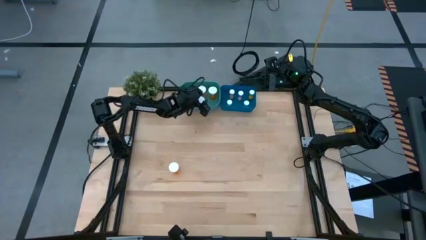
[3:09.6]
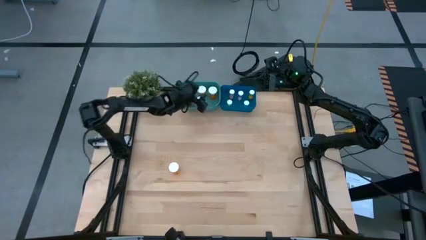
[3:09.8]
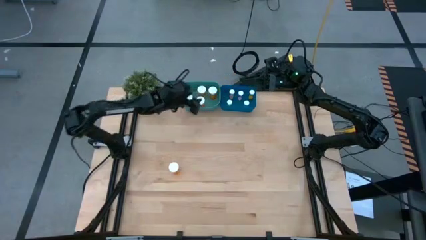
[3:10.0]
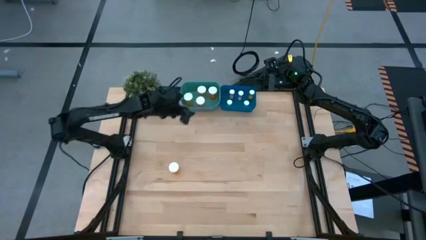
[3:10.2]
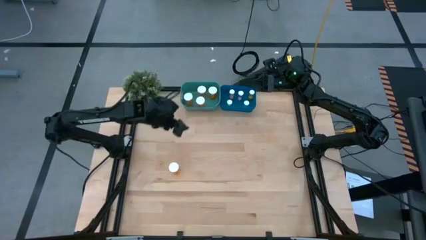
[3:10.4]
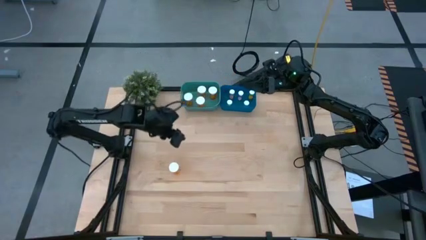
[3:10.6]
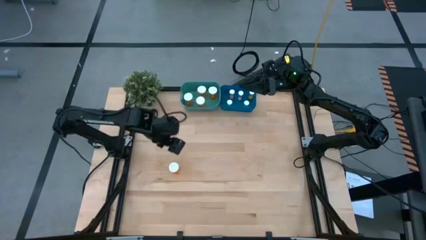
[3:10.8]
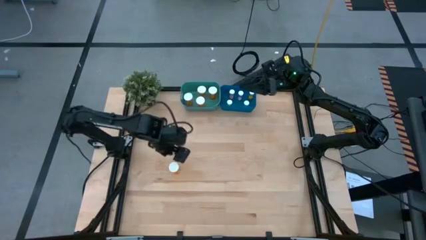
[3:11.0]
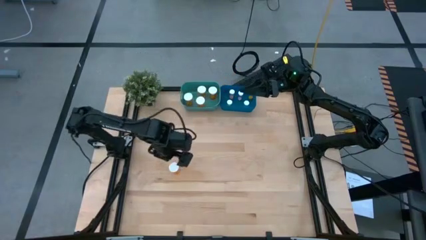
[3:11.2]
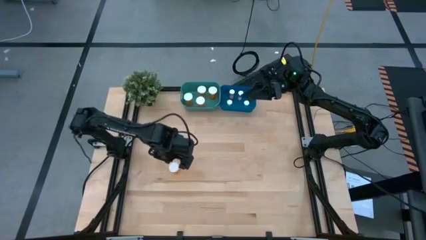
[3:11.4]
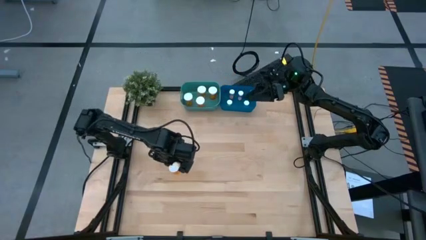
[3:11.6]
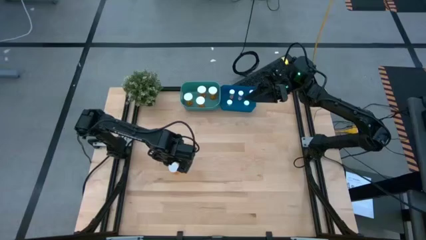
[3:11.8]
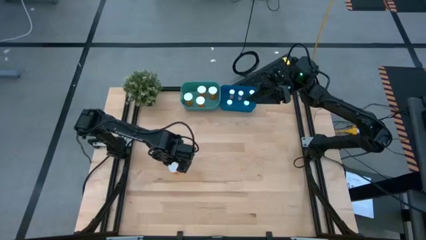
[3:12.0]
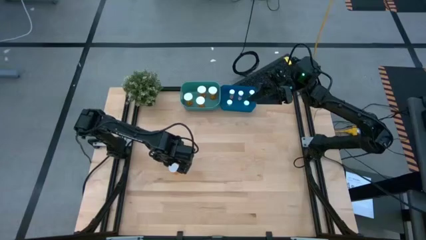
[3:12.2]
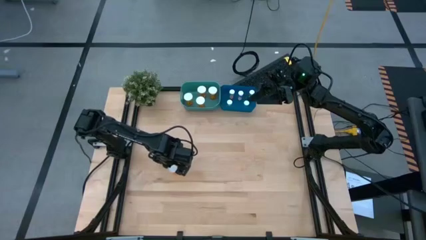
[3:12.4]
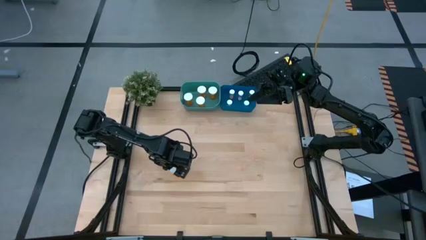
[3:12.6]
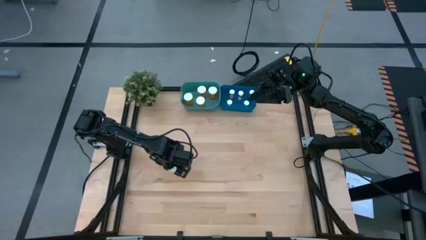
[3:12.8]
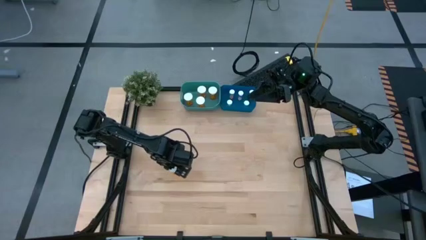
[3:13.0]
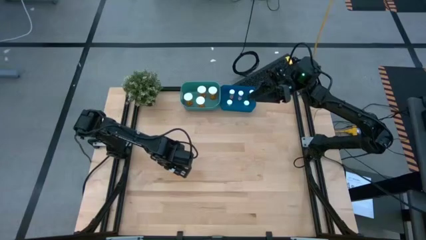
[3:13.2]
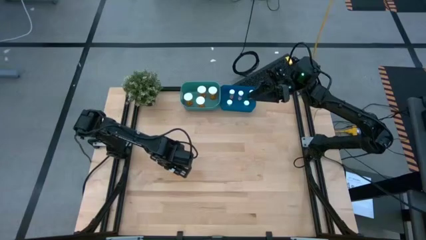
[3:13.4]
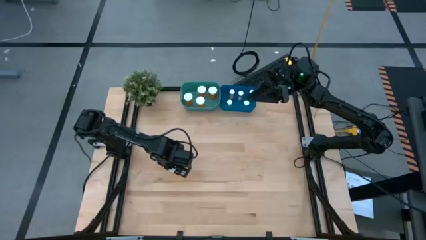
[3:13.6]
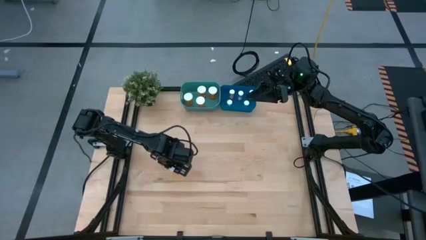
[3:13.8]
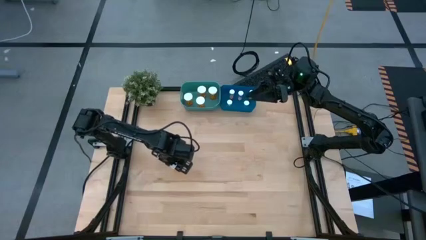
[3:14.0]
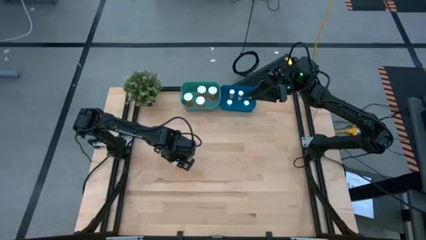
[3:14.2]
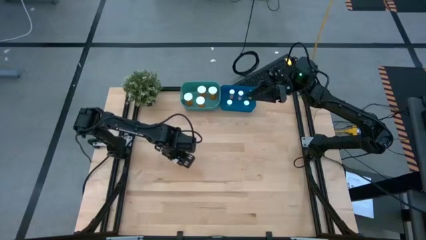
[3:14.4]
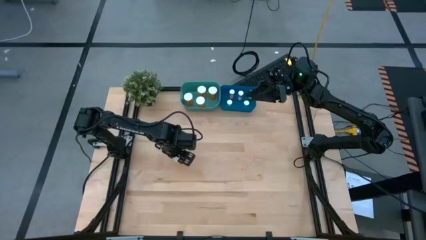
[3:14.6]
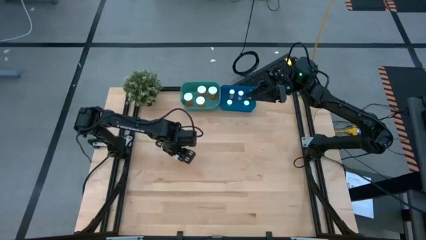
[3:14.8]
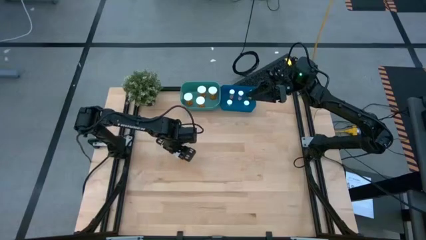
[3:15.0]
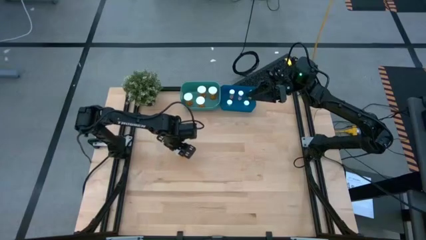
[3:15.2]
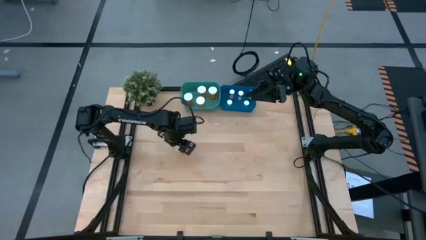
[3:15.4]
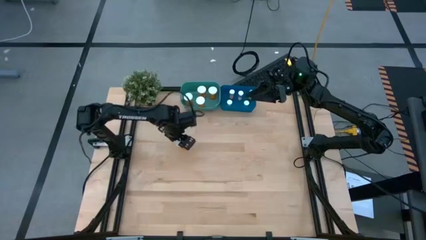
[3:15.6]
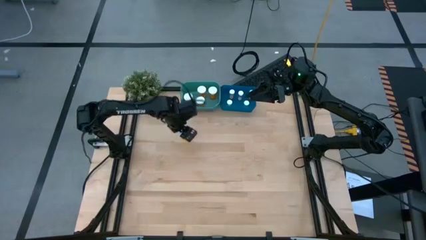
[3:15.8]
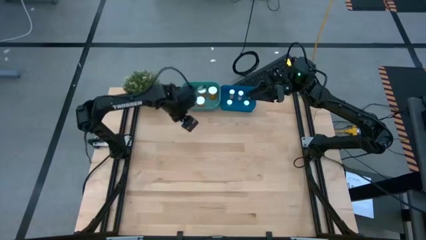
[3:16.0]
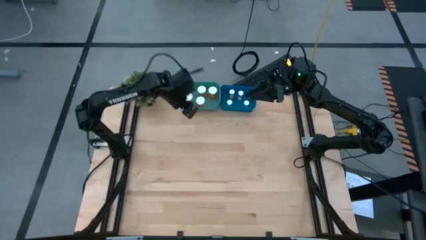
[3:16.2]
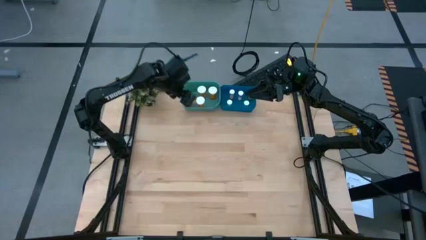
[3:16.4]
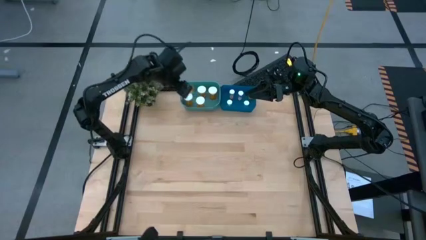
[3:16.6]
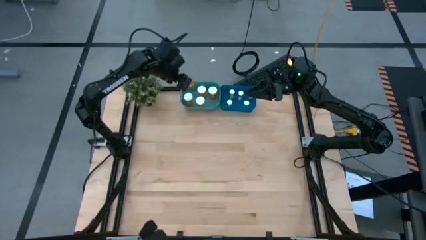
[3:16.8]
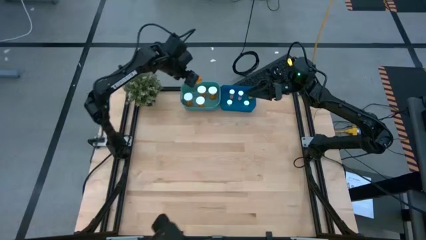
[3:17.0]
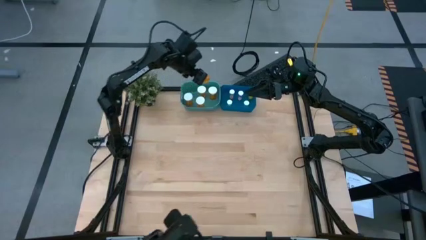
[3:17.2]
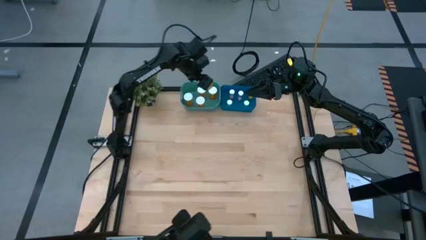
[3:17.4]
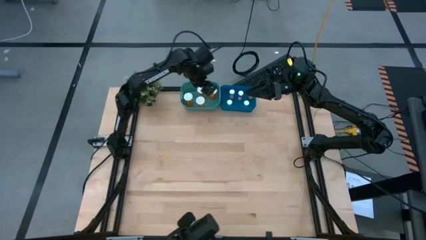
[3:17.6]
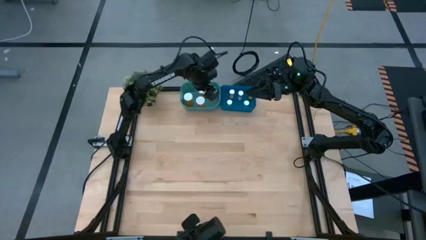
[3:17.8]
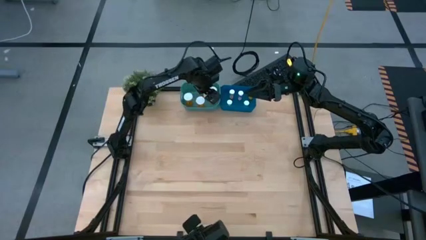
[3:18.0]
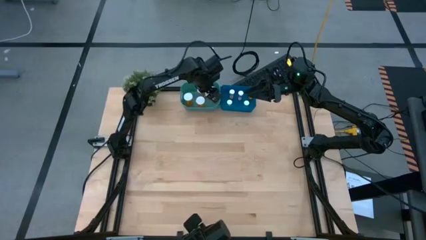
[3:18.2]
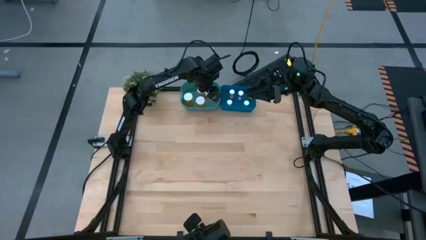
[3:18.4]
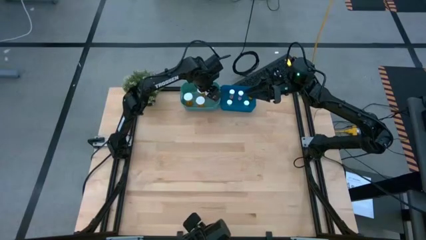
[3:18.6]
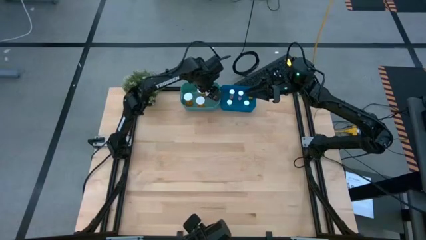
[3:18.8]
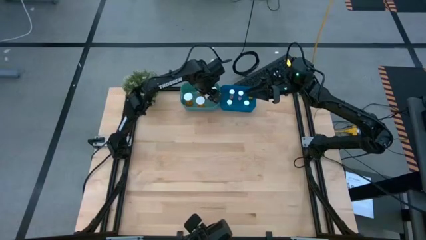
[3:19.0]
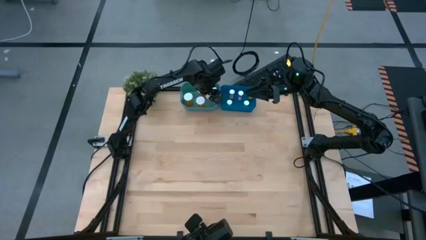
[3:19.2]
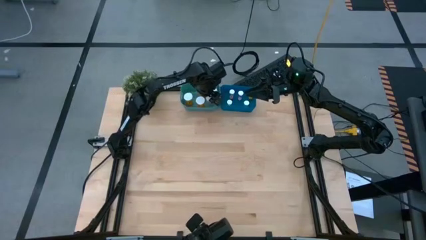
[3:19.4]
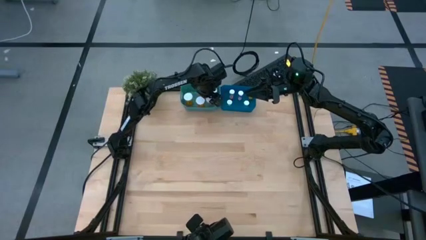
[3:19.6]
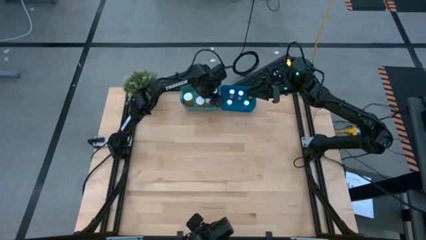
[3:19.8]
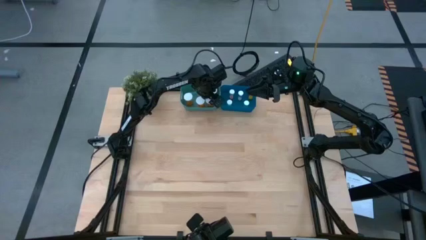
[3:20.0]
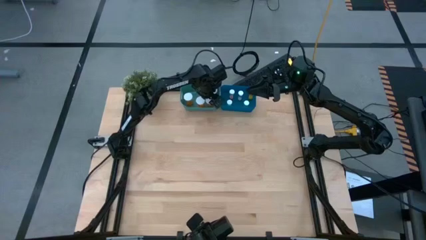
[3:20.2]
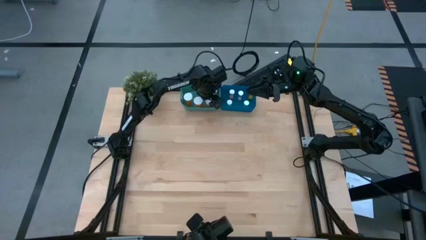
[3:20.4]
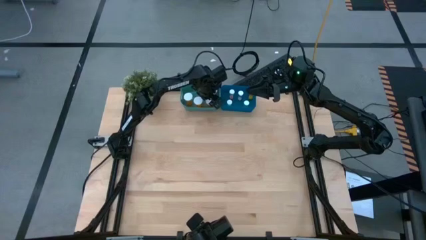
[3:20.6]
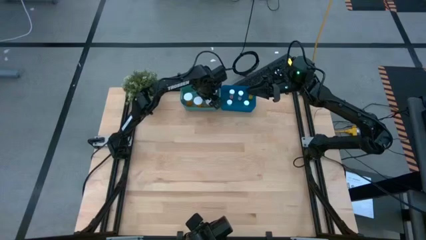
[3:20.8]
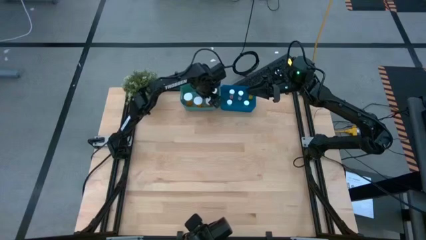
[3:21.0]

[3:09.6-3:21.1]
Task: Pick and place medicine bottles into bin by pill shape (circle, oval)
Put the large orange capsule bottle into the green bin

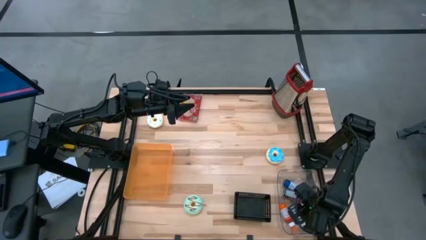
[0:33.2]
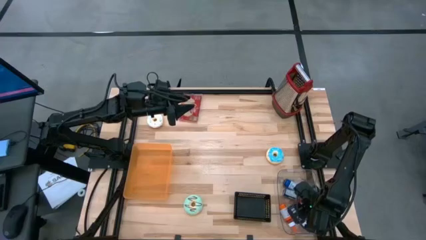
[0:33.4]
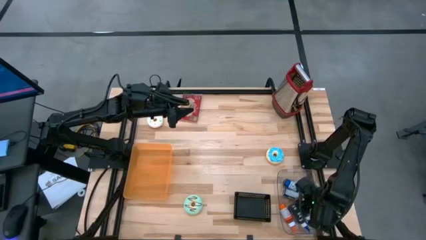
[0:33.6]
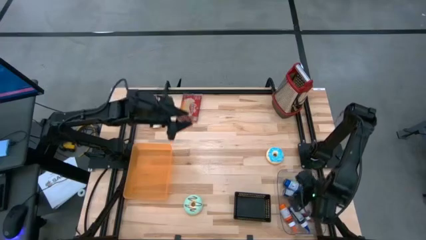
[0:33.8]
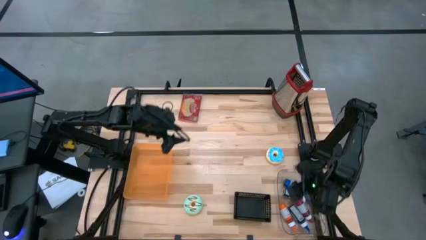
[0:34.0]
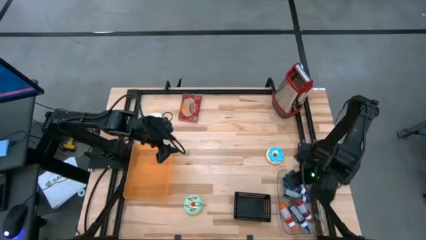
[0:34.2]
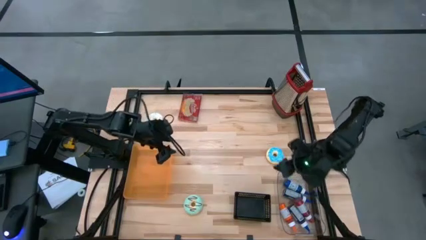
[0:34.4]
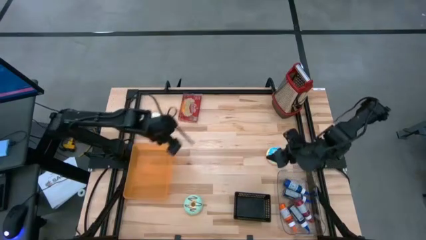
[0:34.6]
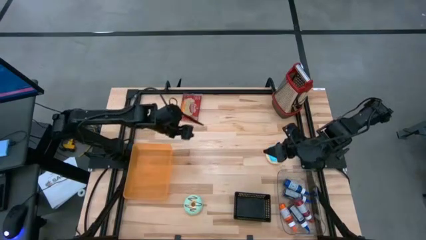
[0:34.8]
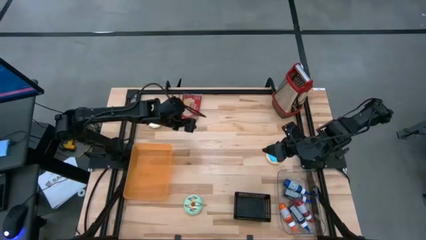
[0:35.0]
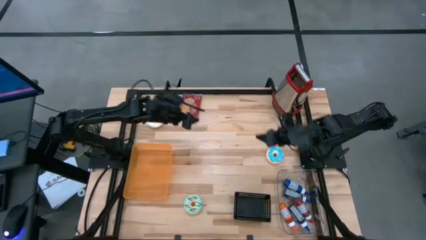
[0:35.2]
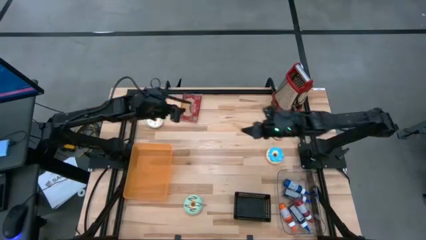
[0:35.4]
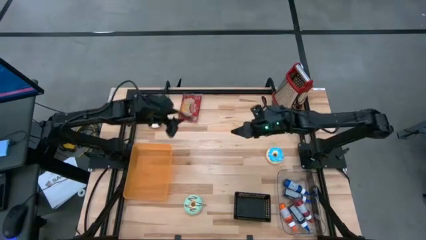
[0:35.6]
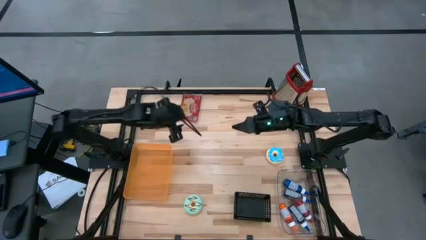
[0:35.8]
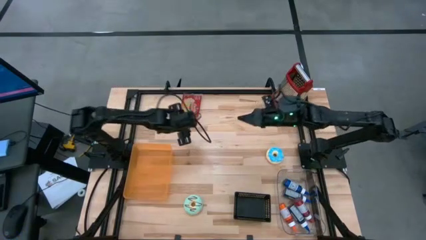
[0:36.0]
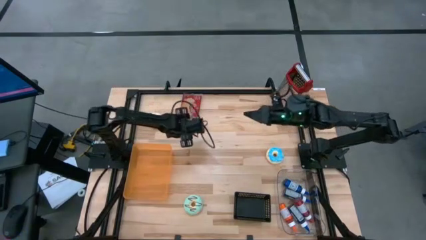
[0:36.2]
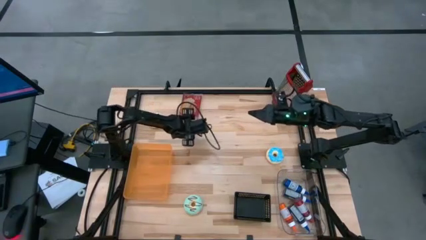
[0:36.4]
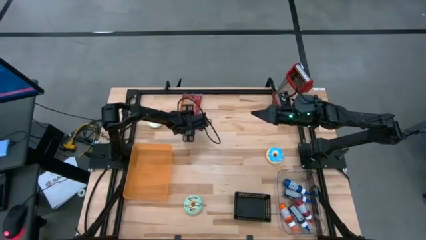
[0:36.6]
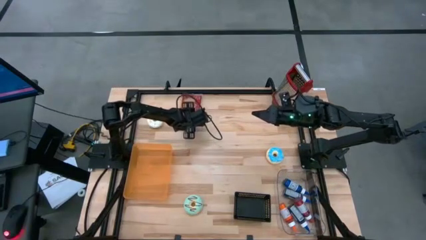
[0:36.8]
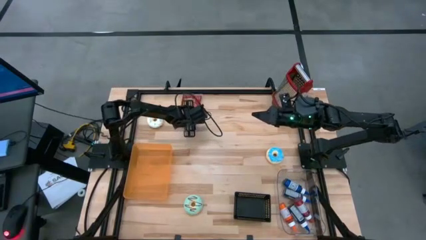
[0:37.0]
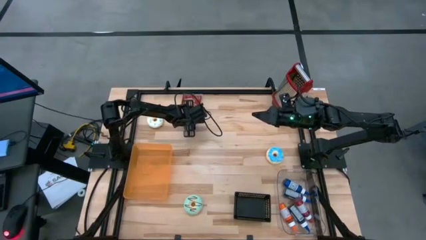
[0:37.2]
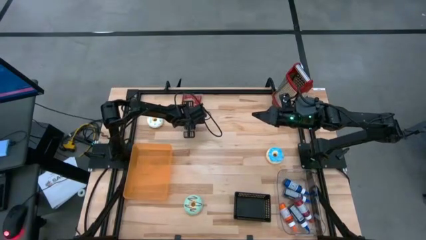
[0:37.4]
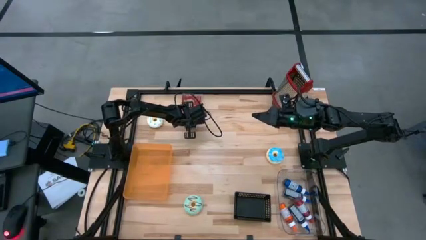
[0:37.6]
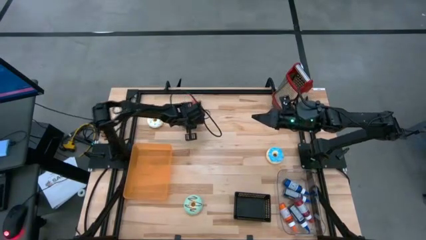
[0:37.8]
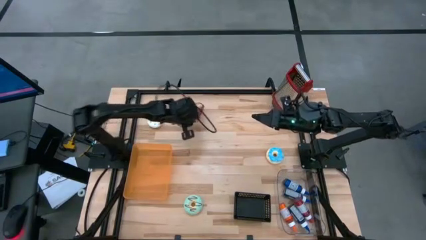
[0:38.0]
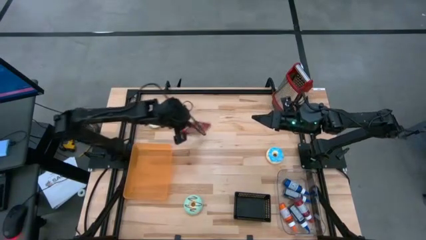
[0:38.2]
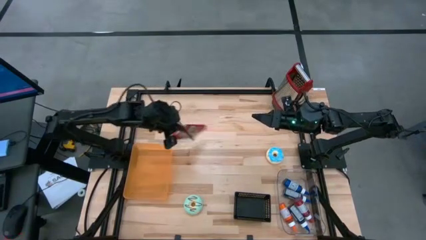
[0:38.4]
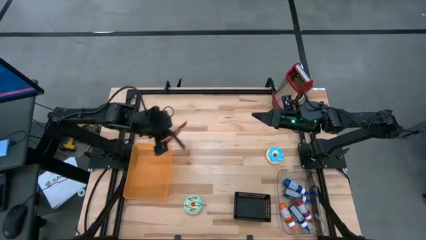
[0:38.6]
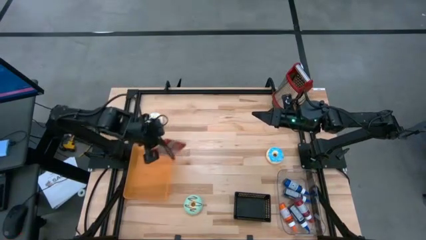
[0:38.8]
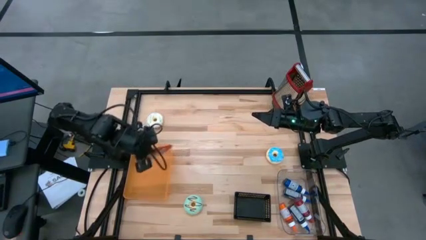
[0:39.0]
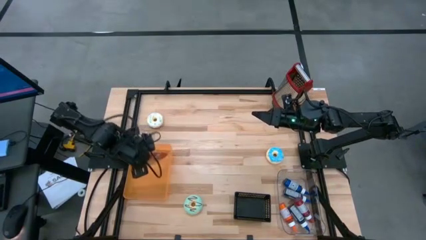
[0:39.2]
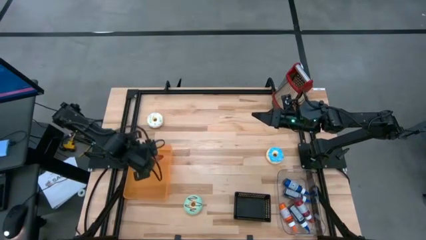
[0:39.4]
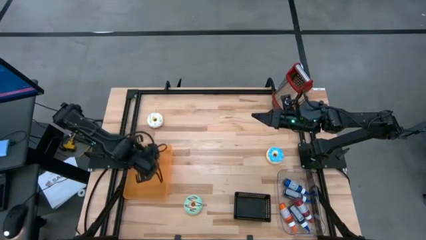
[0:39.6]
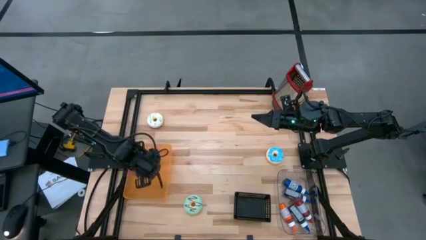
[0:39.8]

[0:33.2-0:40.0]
Task: Pick & Place Food Item
Put the popcorn pack into the orange bin
